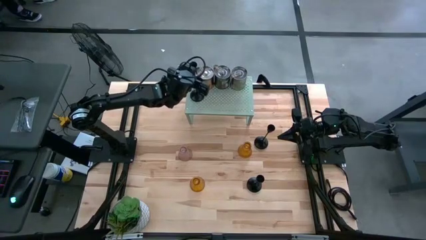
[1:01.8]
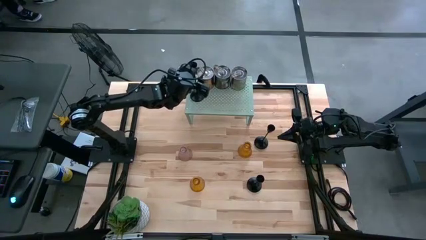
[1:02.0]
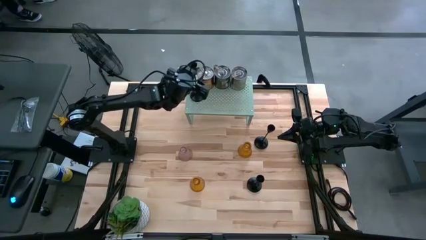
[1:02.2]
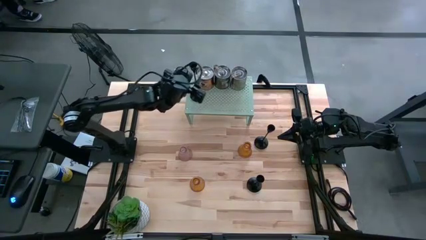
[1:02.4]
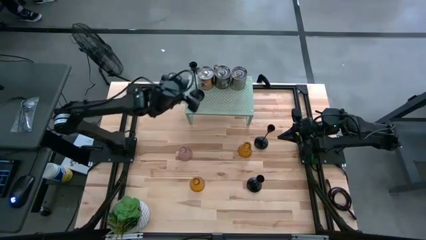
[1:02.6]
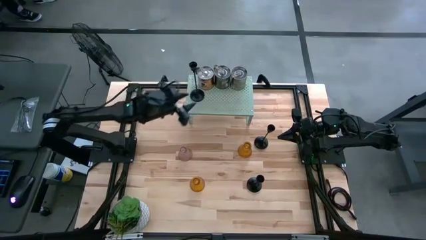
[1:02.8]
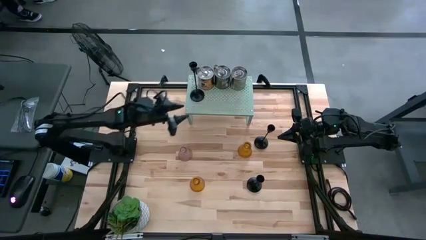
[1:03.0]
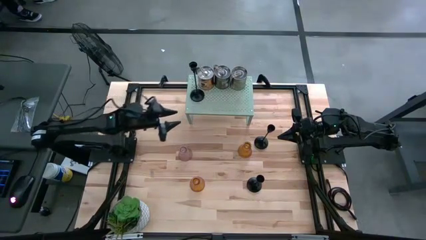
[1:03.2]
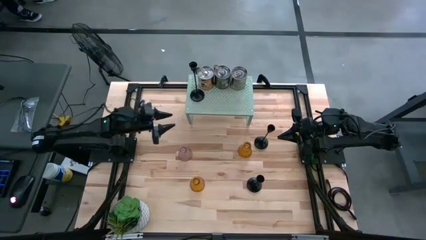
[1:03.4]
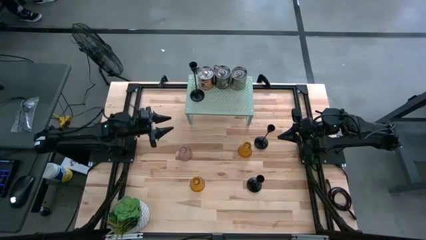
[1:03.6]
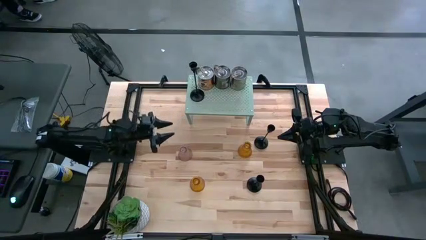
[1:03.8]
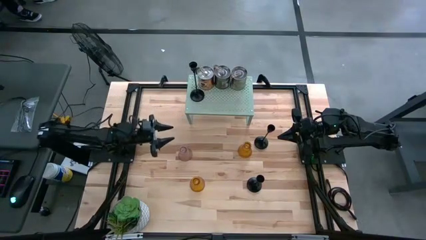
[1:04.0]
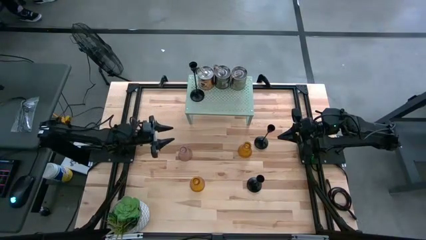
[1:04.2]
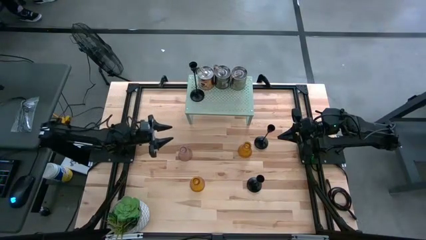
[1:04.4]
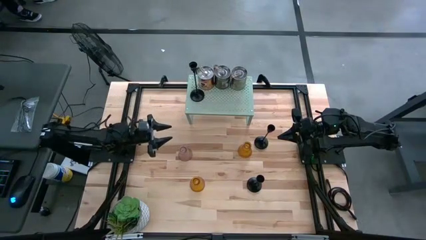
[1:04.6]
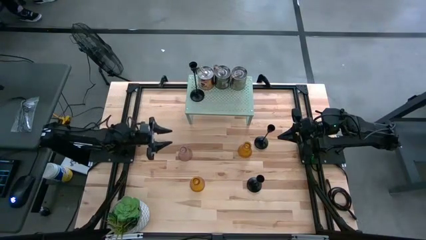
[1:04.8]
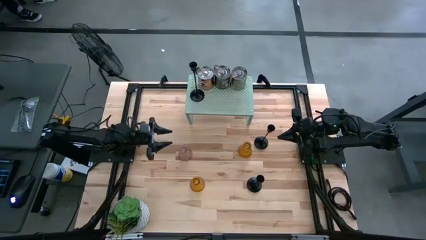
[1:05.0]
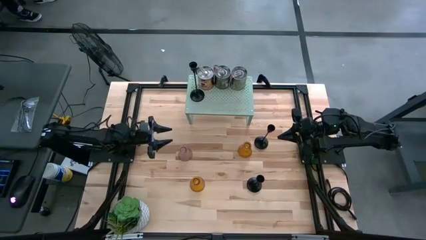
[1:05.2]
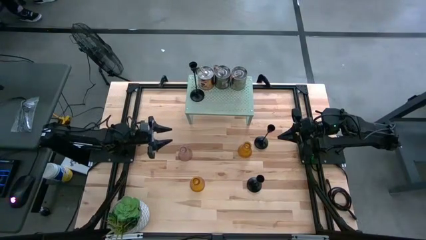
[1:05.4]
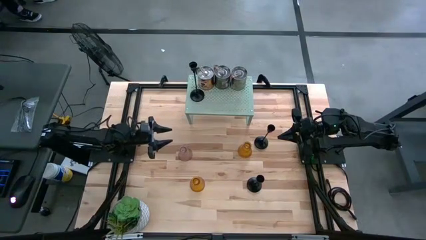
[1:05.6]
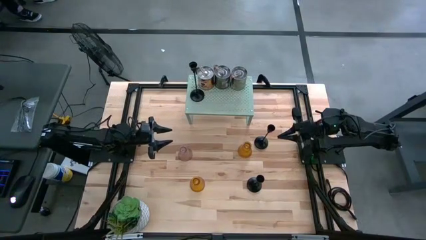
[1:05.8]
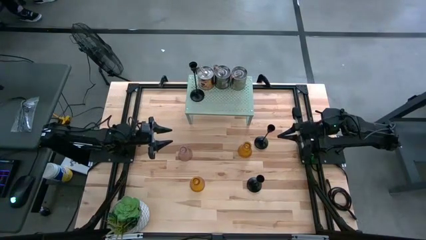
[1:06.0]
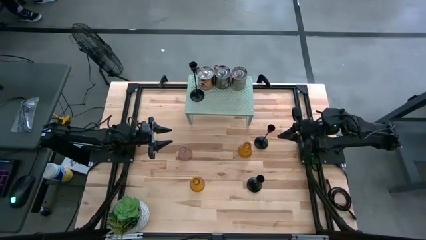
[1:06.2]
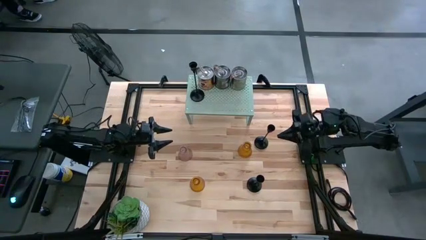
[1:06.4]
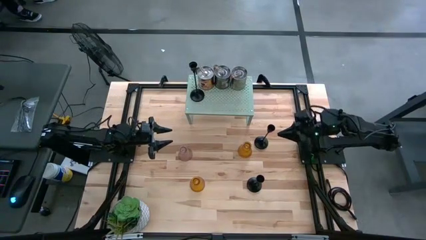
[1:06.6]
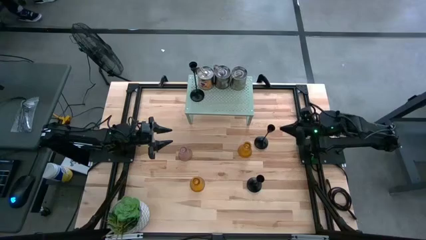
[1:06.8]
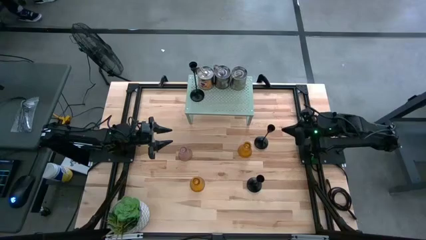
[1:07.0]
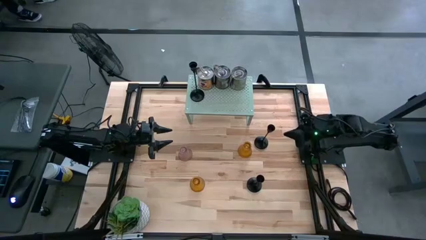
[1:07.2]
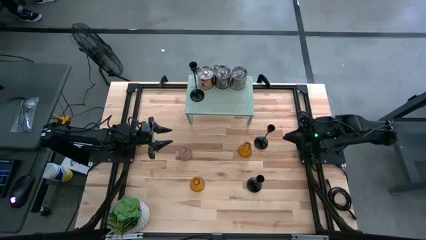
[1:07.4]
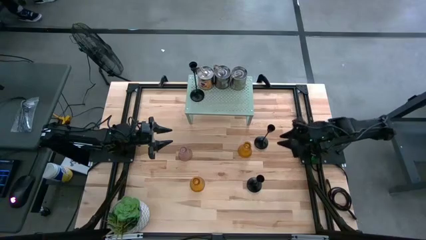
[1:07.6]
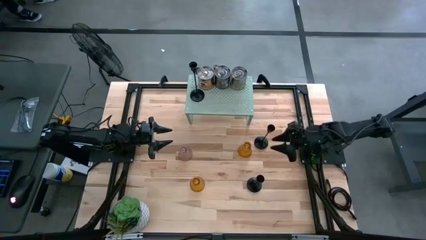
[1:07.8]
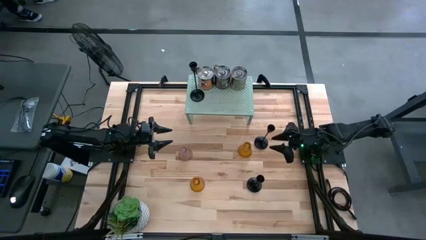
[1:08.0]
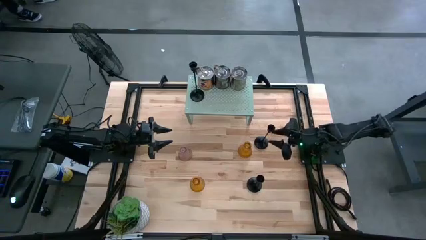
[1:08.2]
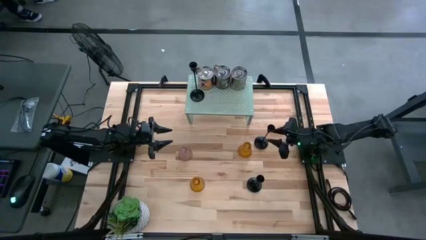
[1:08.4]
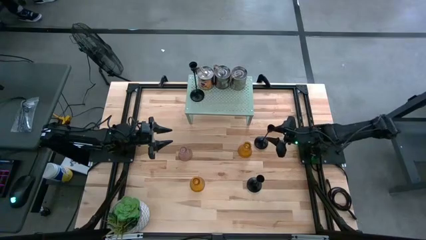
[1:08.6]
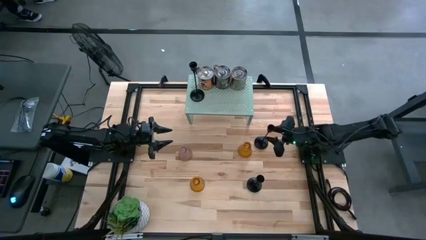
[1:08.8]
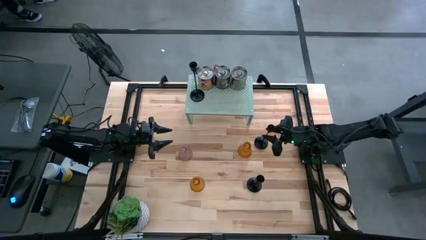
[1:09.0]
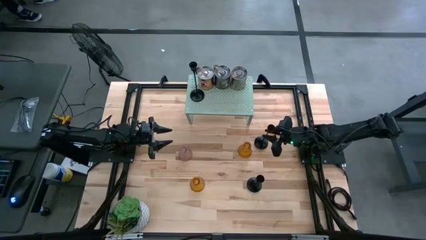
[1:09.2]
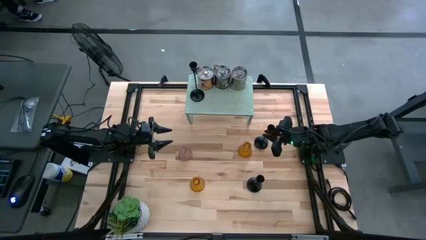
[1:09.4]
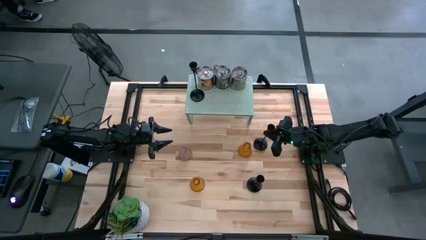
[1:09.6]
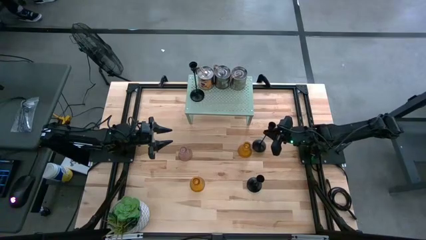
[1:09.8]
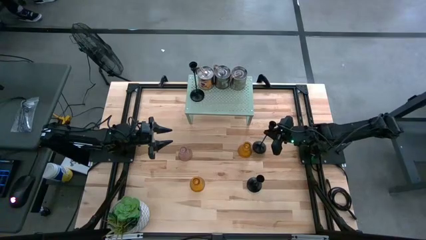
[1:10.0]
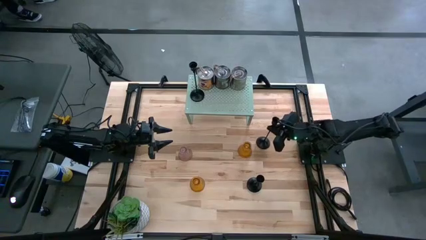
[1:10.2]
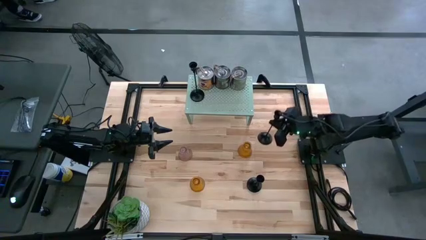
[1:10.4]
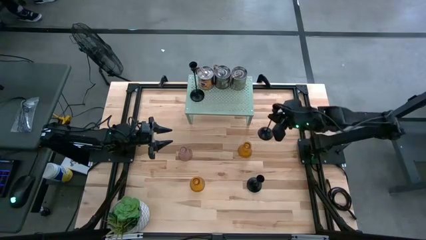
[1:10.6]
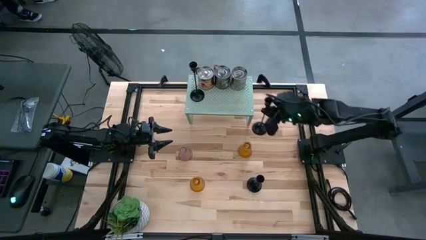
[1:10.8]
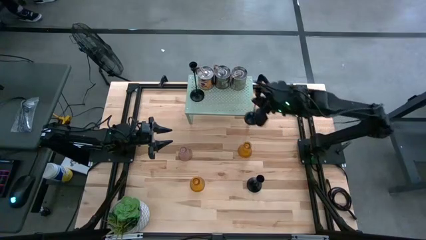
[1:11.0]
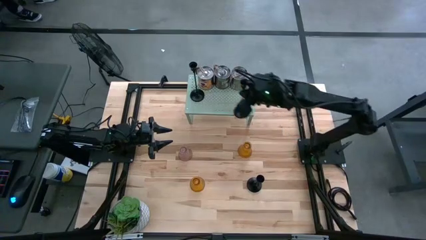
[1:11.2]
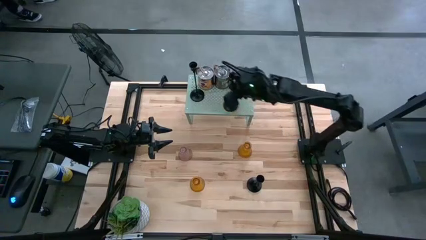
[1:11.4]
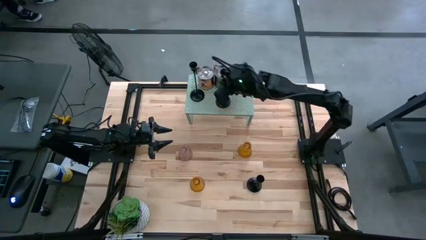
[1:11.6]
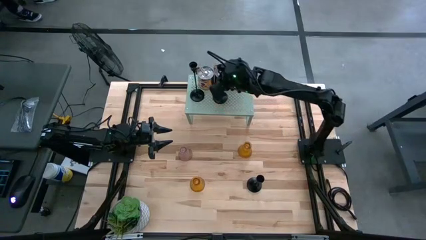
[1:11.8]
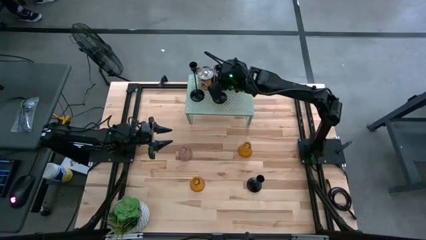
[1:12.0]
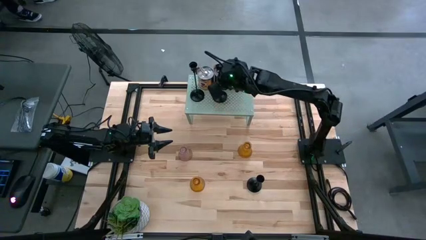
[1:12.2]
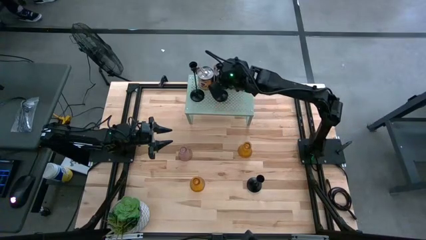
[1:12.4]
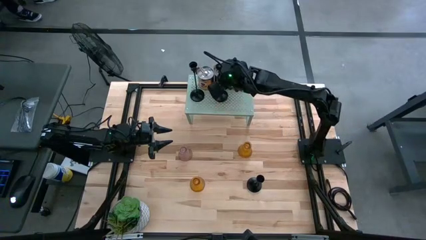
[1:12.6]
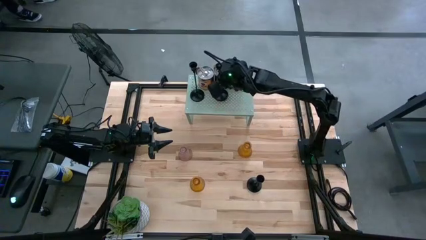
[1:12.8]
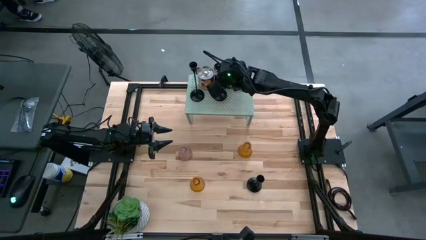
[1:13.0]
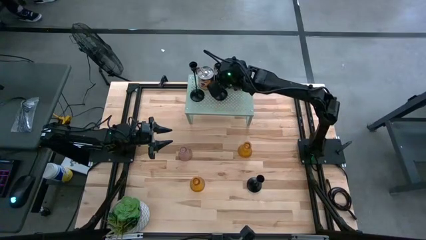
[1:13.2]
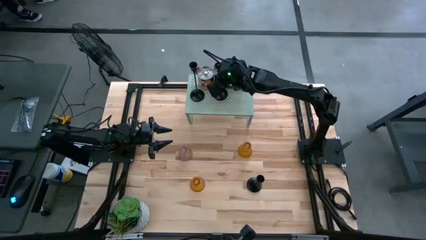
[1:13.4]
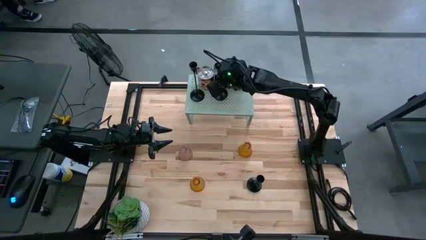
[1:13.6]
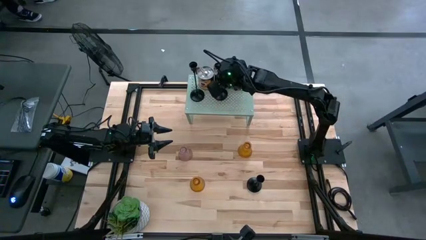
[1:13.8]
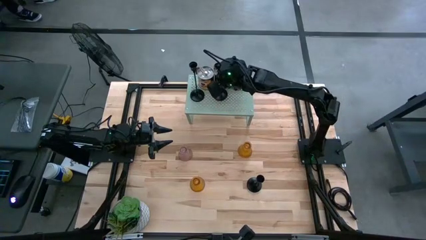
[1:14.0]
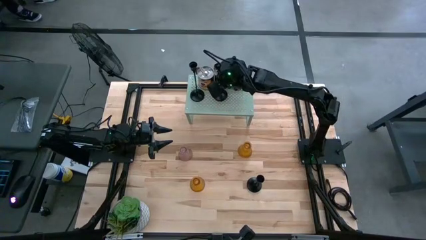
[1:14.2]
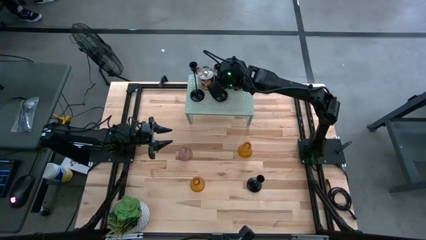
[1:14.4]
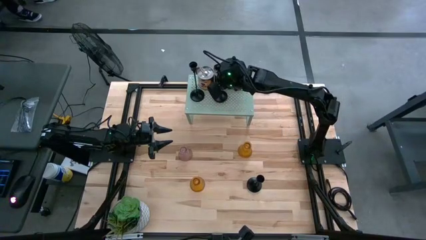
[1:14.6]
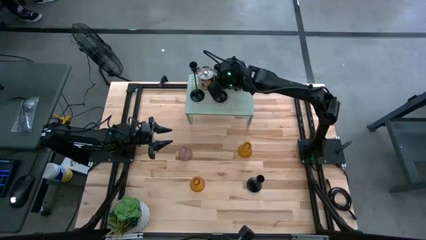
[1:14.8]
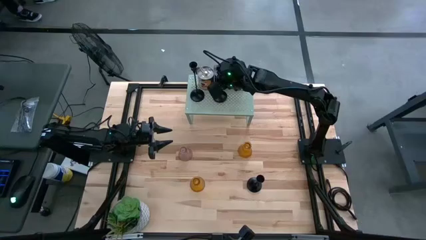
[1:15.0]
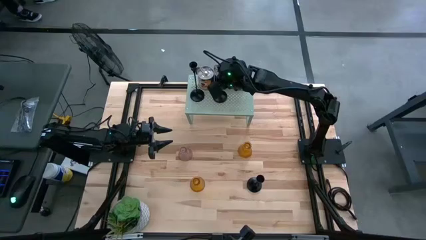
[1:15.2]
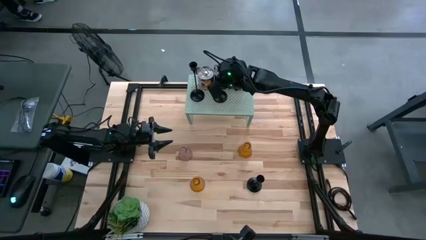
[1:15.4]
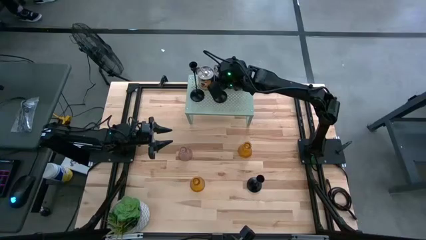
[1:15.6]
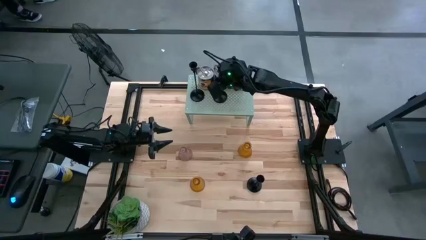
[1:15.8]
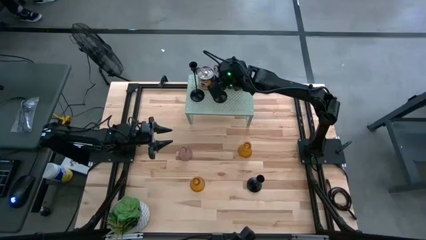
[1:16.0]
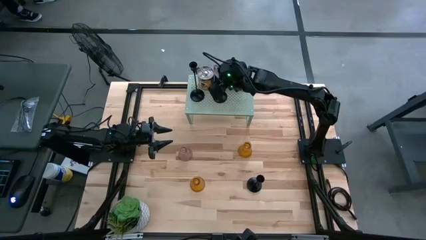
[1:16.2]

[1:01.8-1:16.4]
Task: Pick & Place candle stick holders
Put the top black candle holder on the shelf
